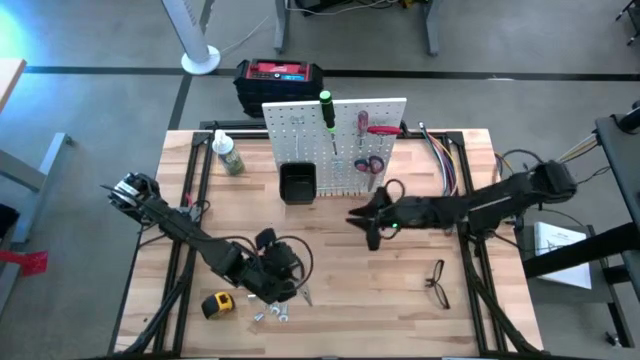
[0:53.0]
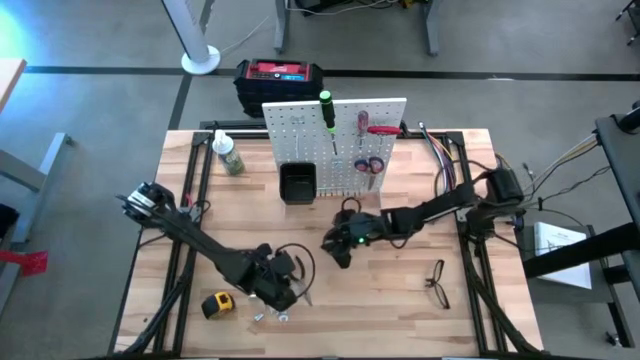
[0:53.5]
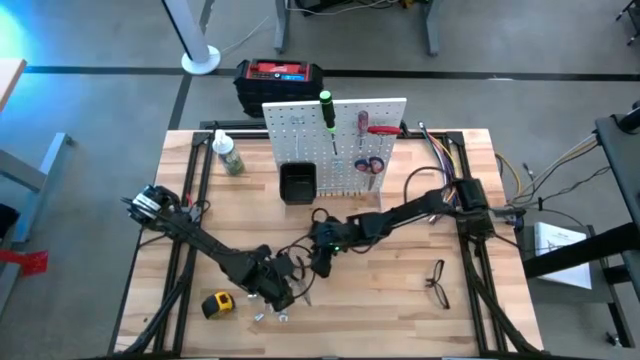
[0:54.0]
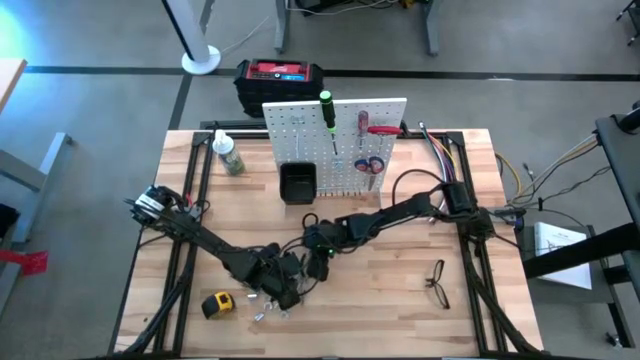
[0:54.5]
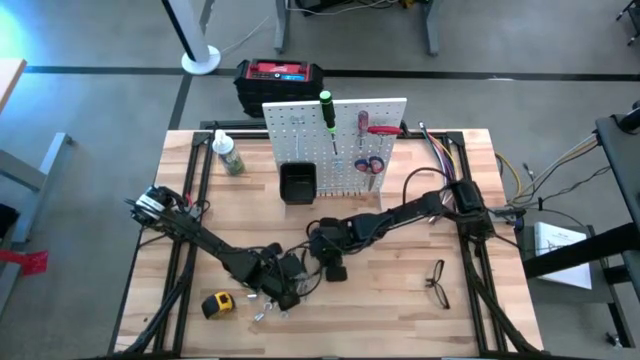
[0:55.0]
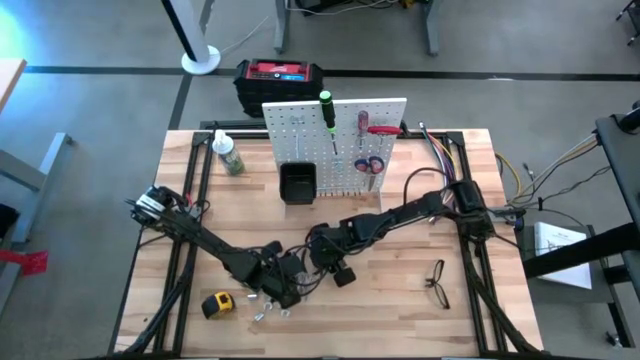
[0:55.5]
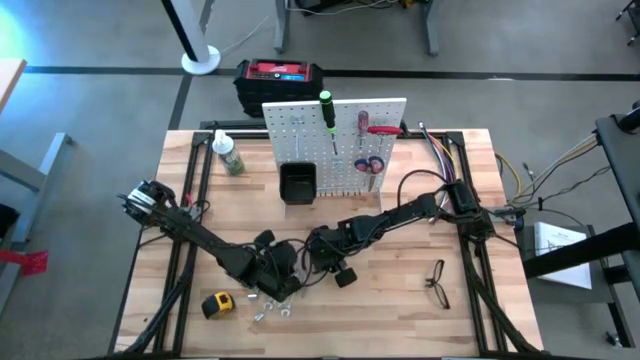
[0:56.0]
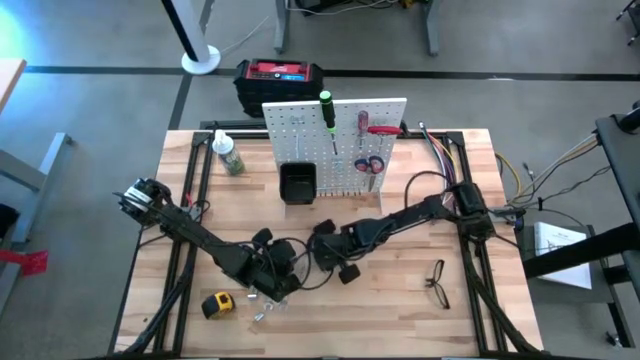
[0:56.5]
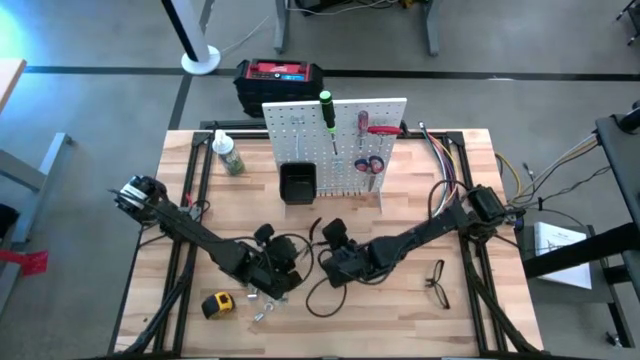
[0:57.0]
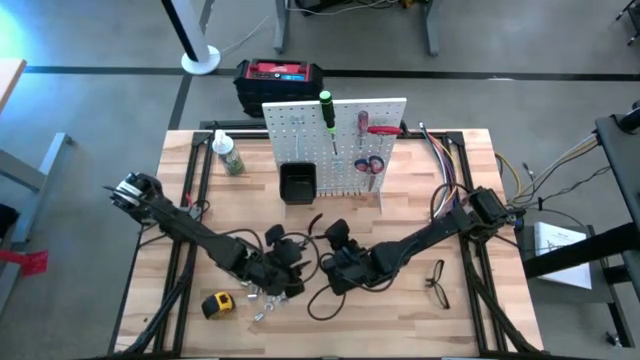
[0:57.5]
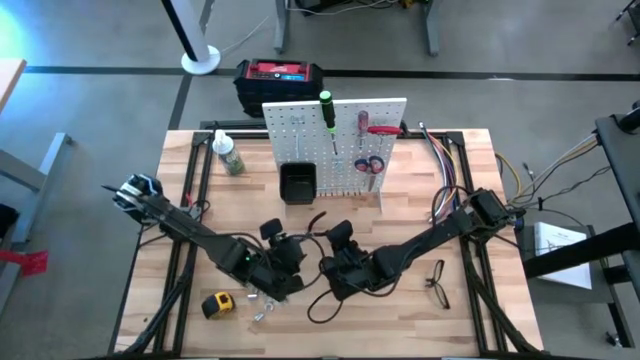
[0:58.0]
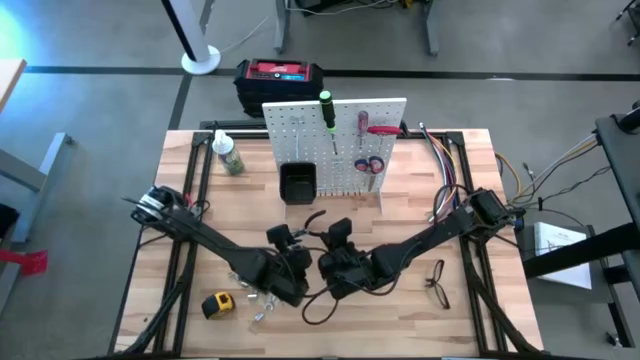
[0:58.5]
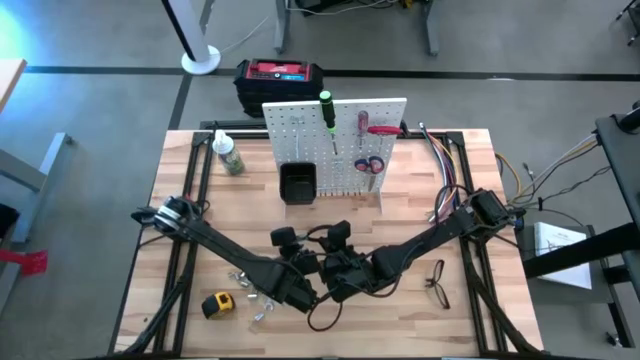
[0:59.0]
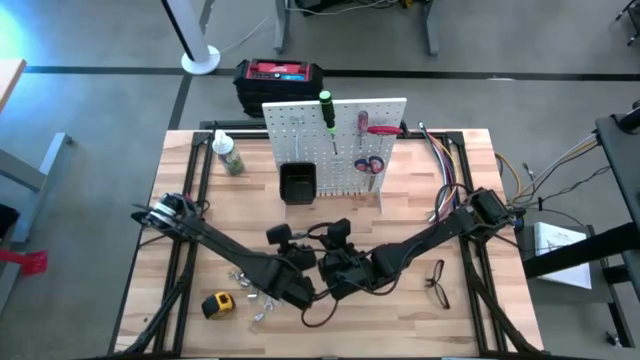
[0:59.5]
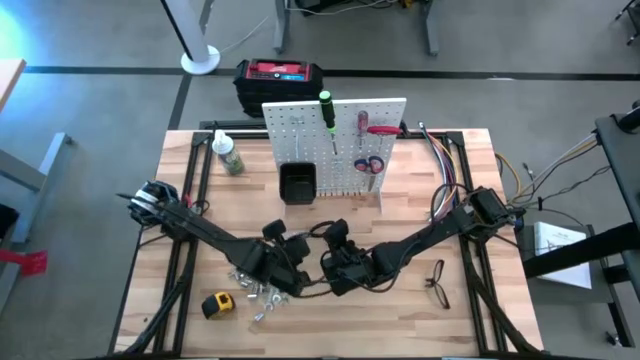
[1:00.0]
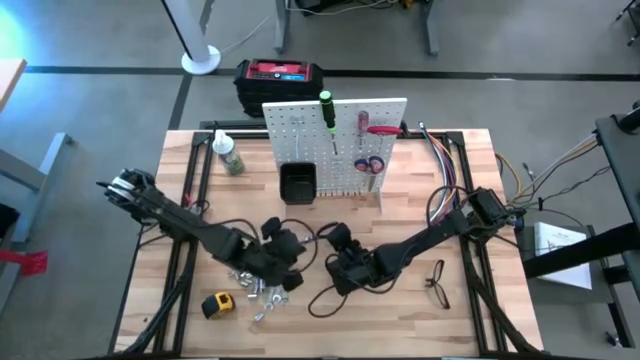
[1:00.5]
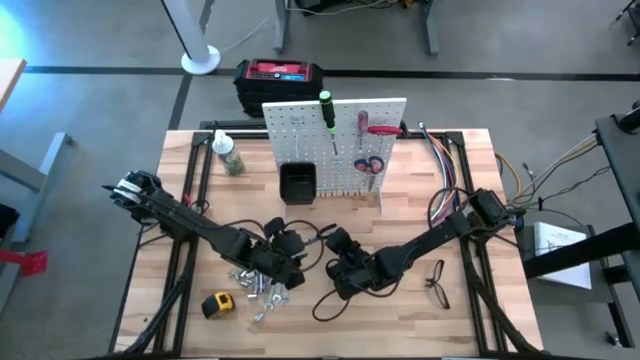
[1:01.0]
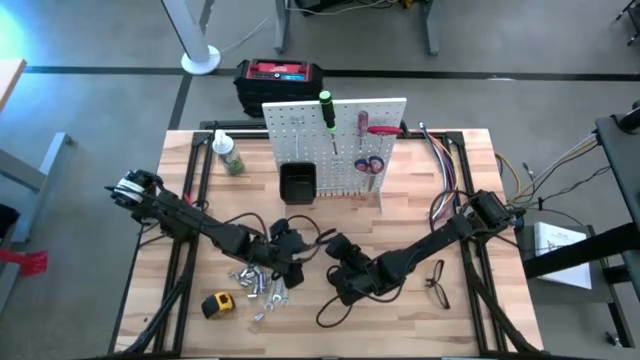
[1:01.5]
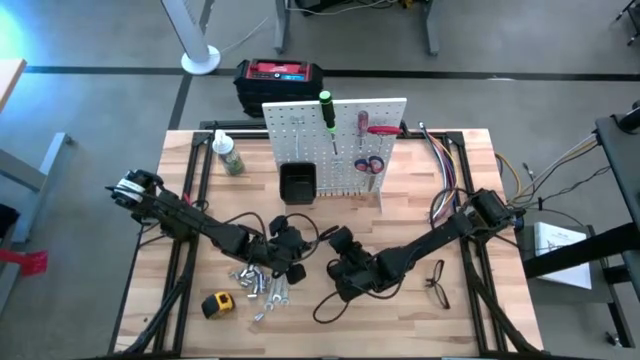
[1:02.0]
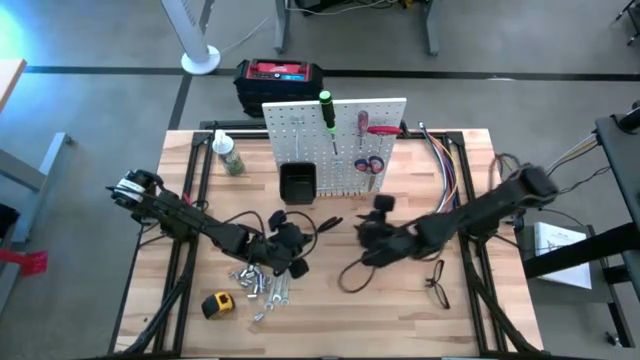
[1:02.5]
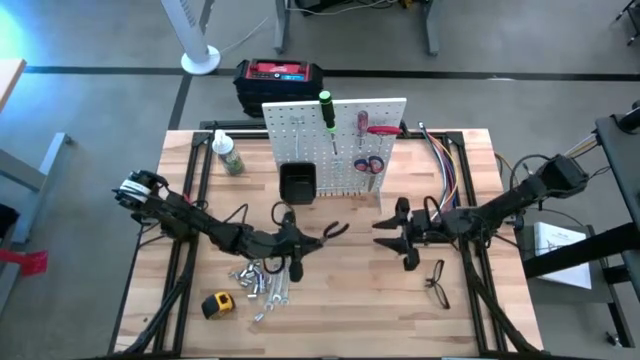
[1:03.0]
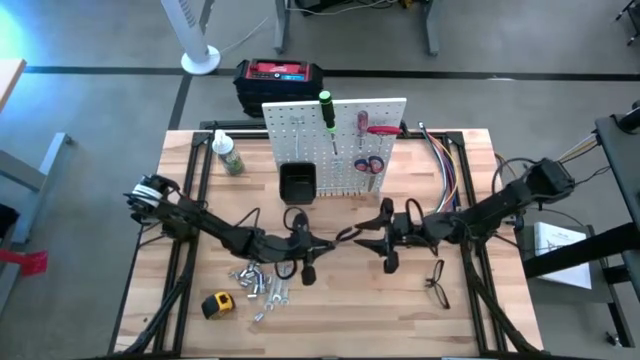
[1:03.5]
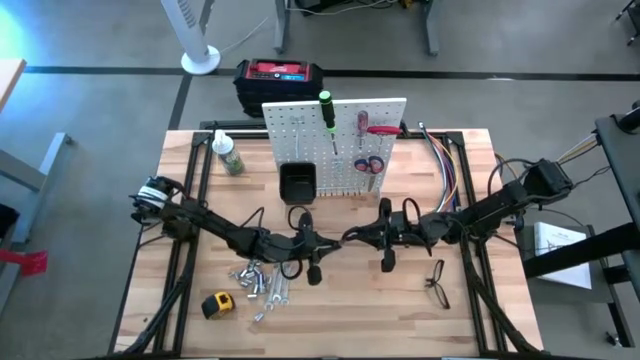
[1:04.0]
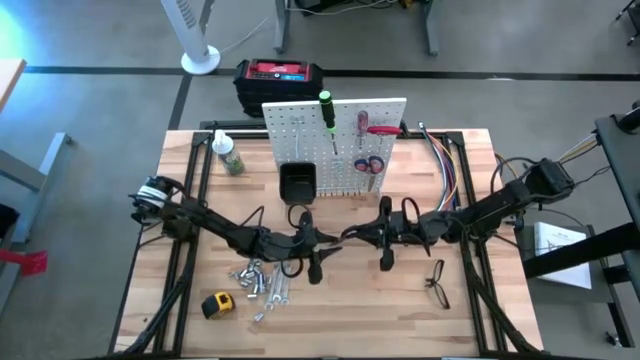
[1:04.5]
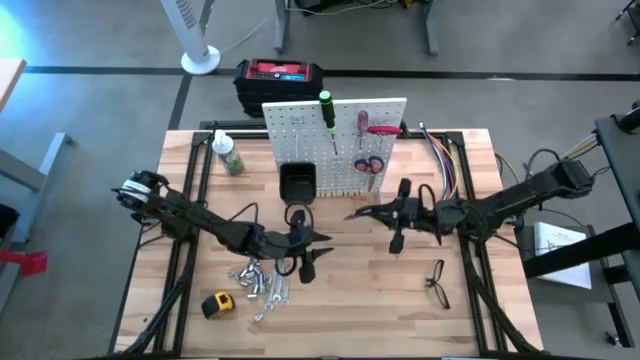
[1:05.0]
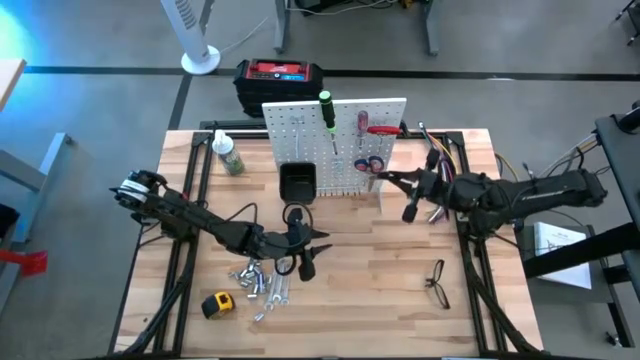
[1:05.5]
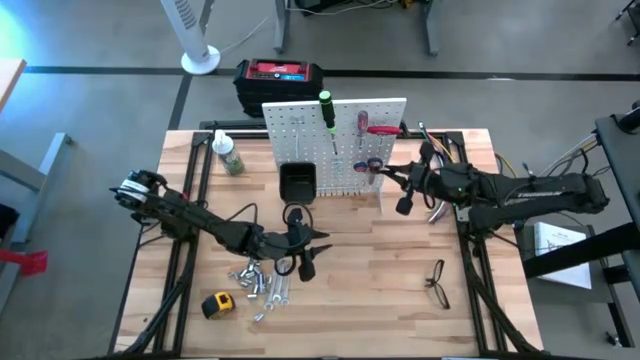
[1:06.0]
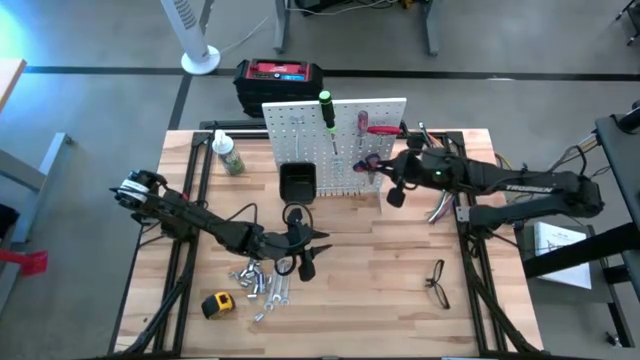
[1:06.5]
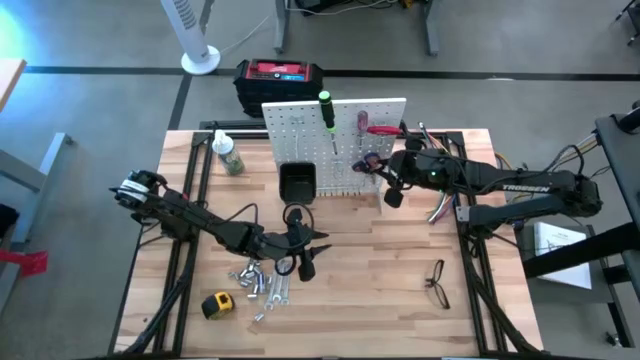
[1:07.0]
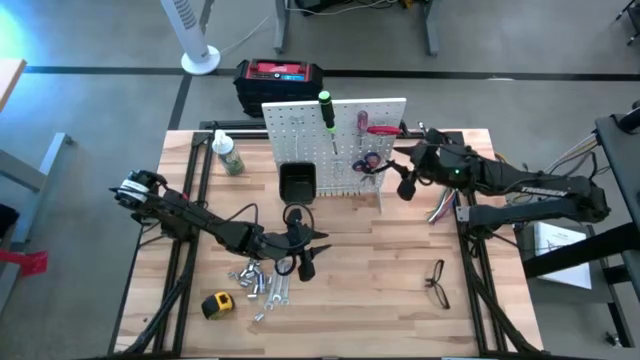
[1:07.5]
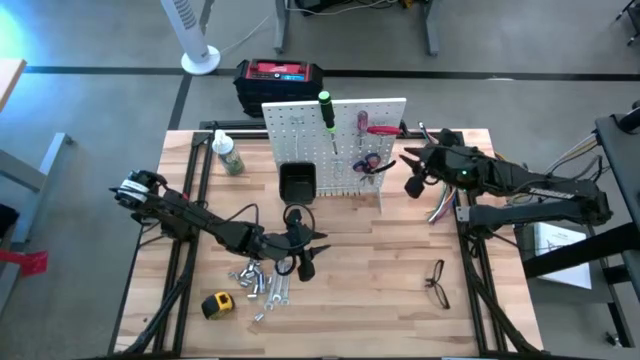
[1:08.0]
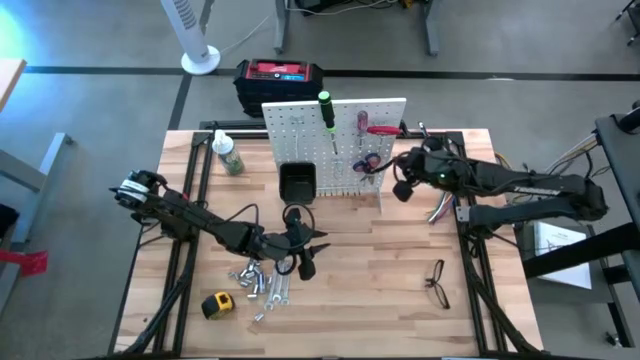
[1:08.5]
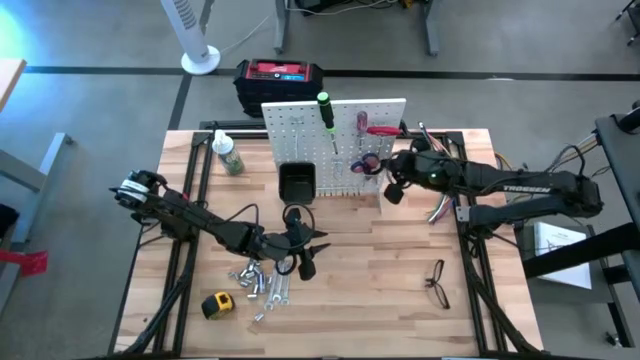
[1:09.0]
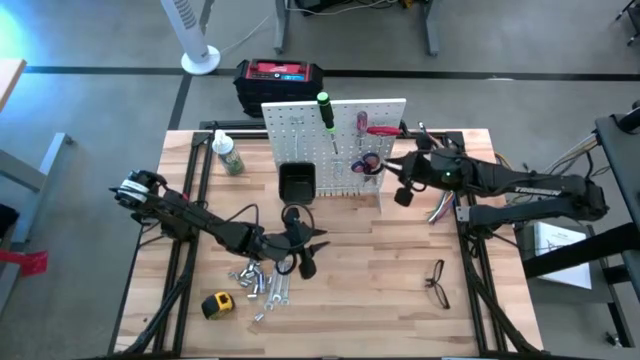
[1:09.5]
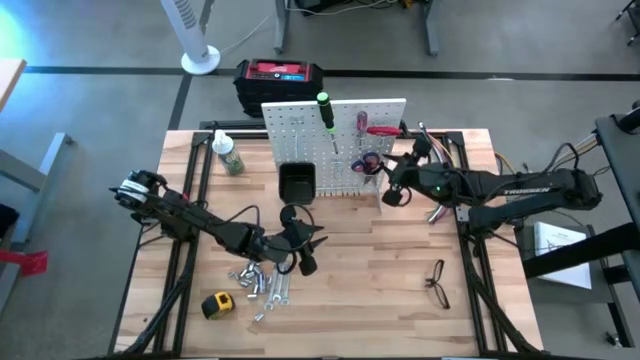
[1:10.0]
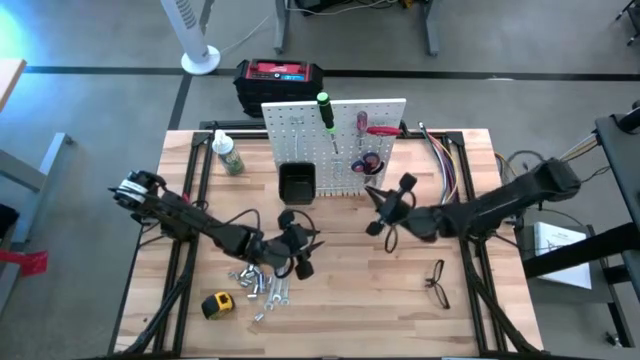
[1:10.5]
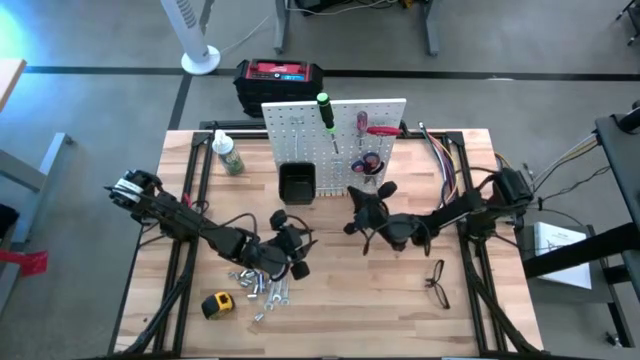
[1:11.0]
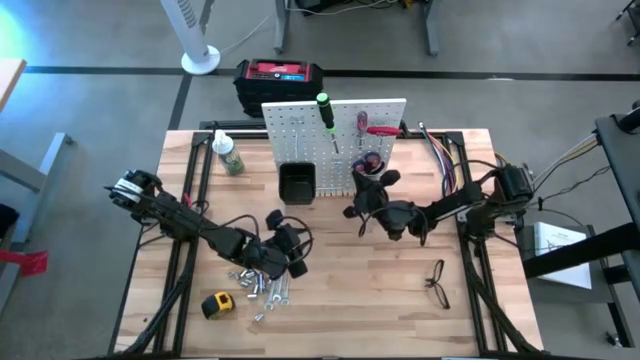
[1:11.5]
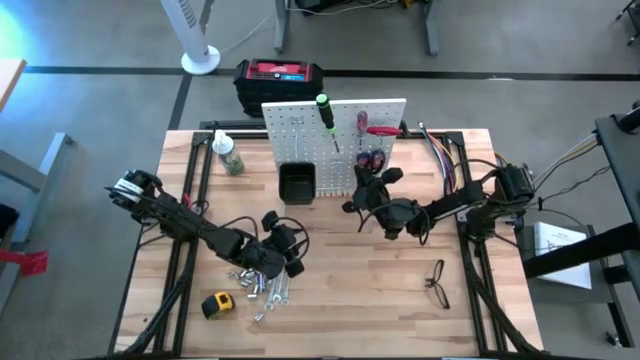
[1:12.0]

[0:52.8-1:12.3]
Task: Hang tools onto peg board
Hang the black pliers on the pegboard

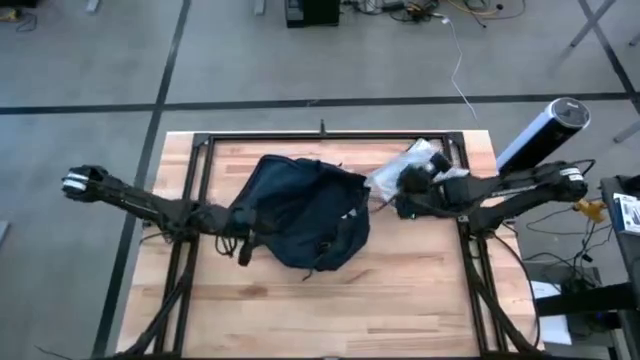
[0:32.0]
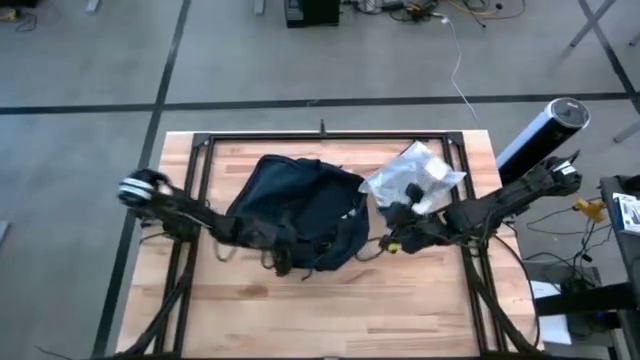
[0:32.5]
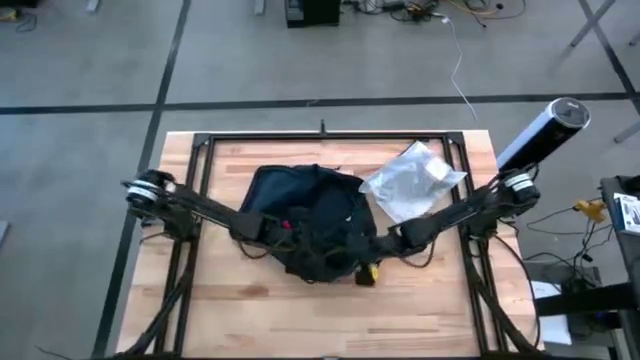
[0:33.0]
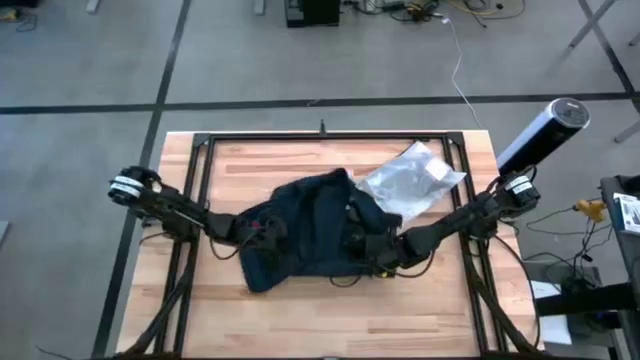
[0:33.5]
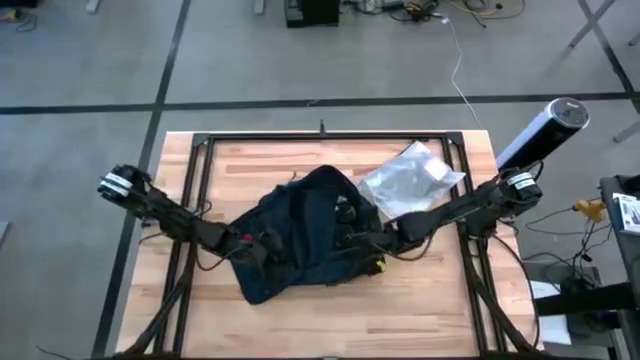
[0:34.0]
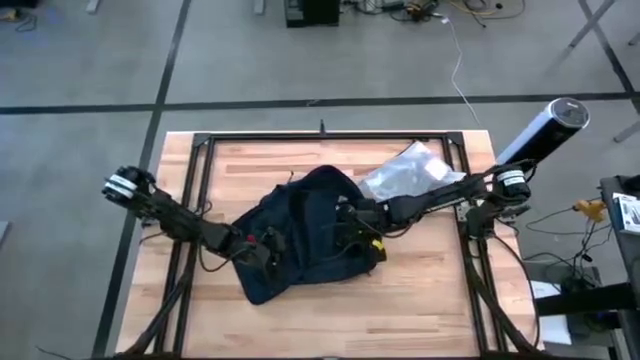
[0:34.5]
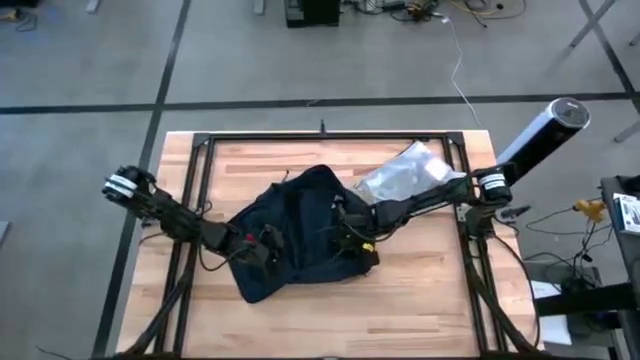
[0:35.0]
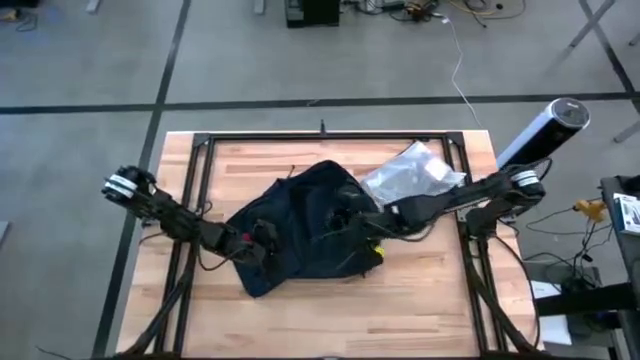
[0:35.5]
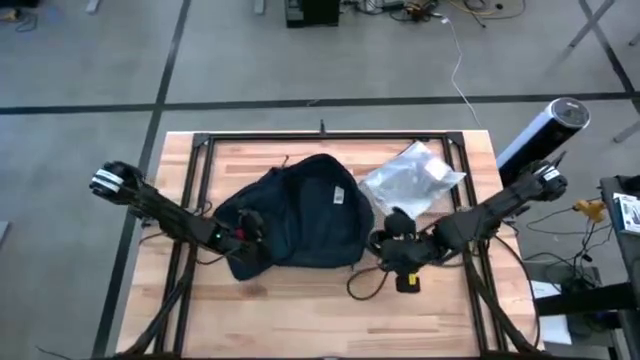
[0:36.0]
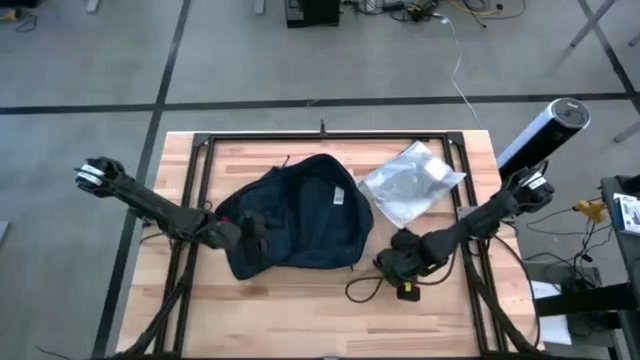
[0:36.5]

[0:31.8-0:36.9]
Task: Unpack backpack
Remove the black headphone from the blue backpack
